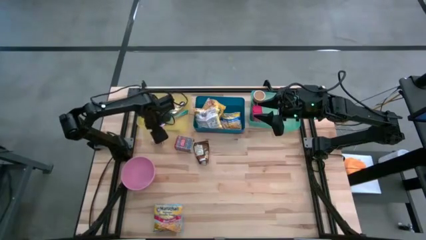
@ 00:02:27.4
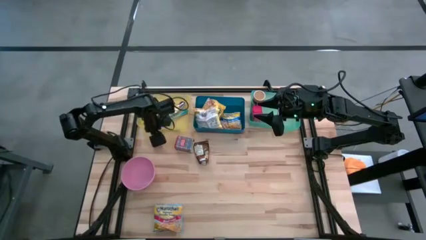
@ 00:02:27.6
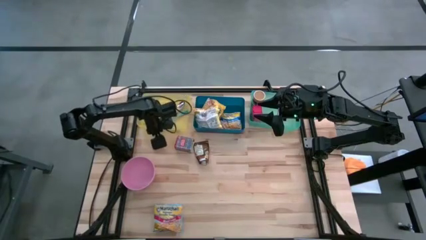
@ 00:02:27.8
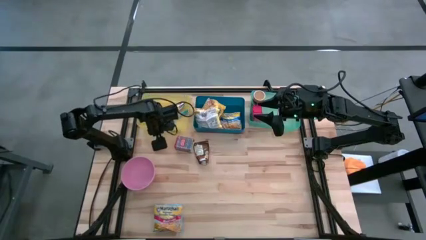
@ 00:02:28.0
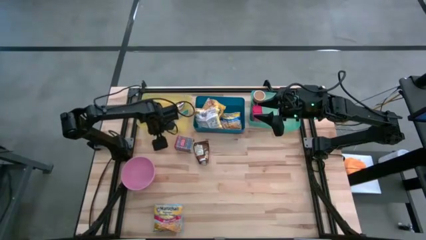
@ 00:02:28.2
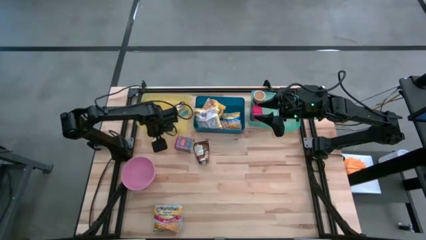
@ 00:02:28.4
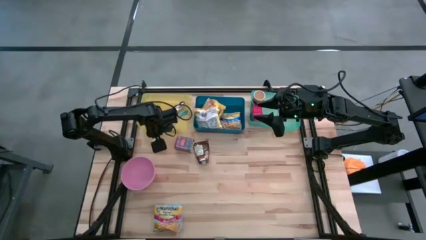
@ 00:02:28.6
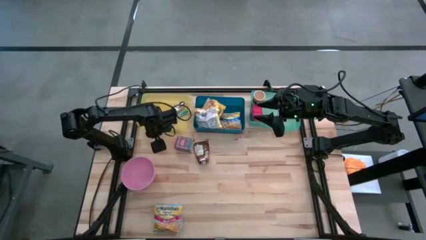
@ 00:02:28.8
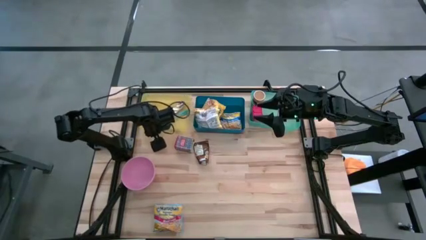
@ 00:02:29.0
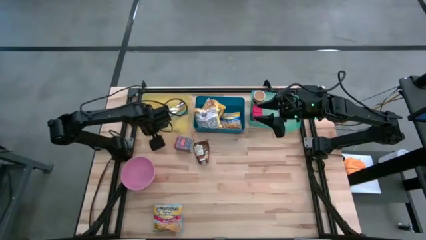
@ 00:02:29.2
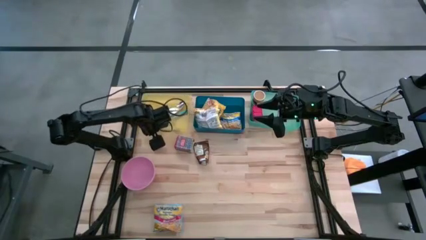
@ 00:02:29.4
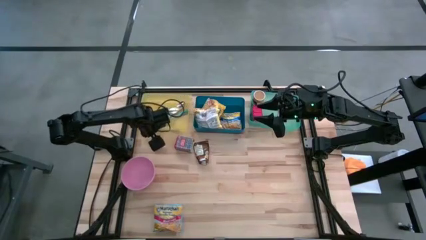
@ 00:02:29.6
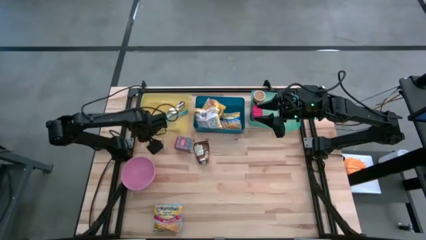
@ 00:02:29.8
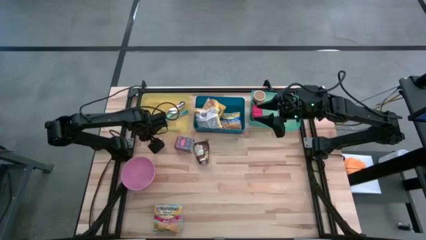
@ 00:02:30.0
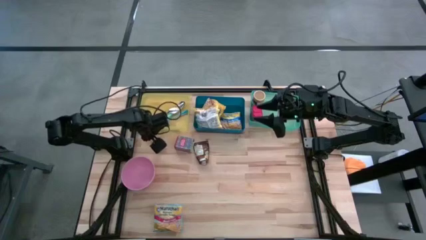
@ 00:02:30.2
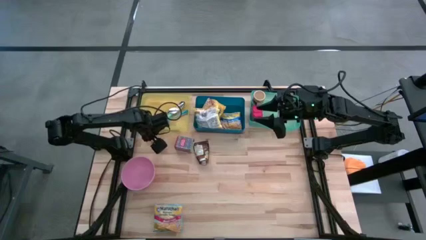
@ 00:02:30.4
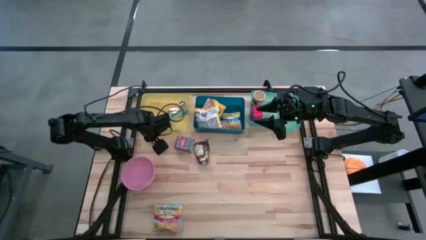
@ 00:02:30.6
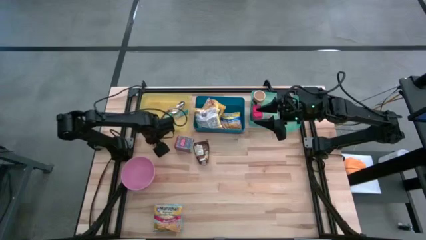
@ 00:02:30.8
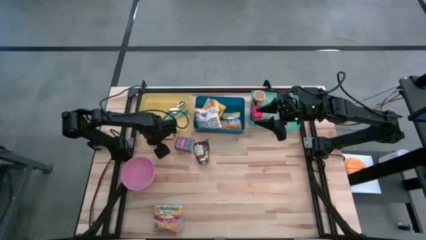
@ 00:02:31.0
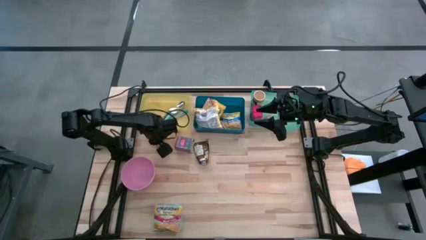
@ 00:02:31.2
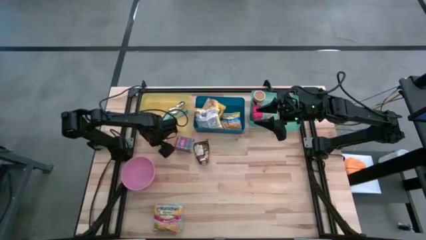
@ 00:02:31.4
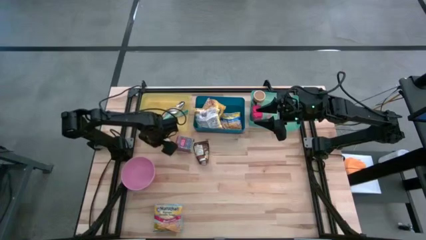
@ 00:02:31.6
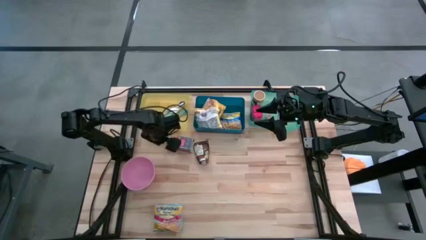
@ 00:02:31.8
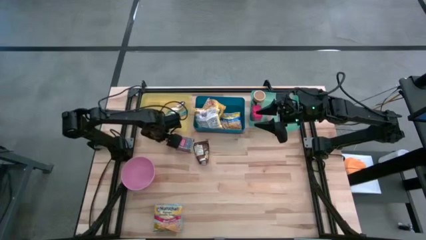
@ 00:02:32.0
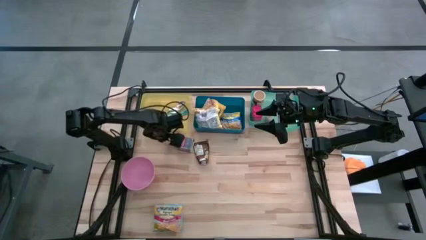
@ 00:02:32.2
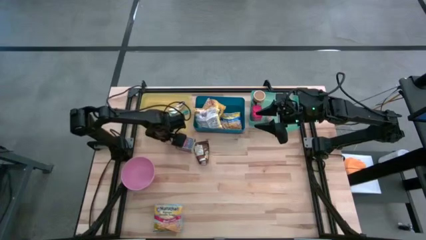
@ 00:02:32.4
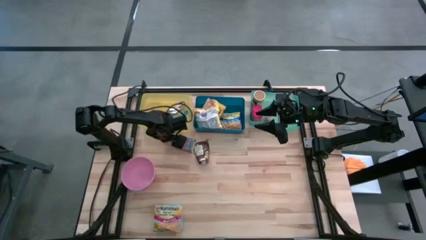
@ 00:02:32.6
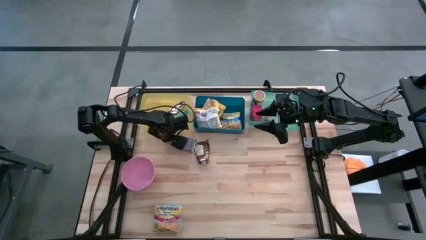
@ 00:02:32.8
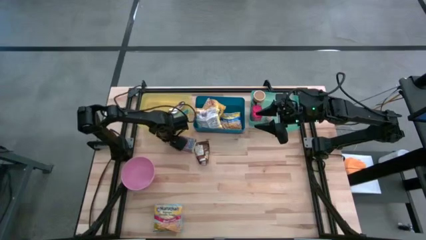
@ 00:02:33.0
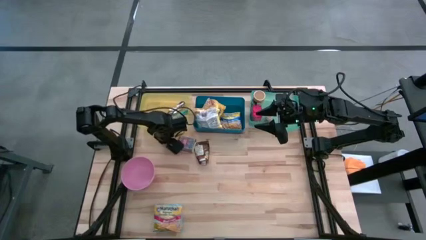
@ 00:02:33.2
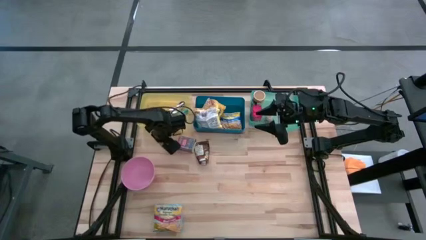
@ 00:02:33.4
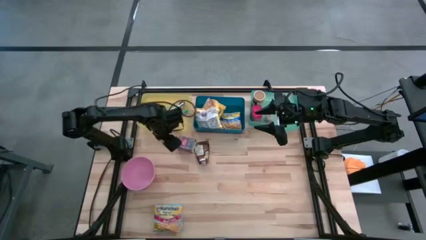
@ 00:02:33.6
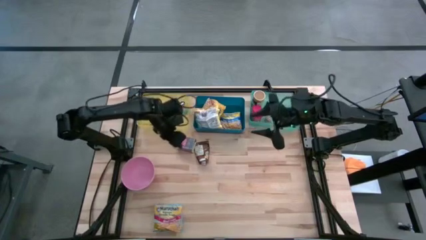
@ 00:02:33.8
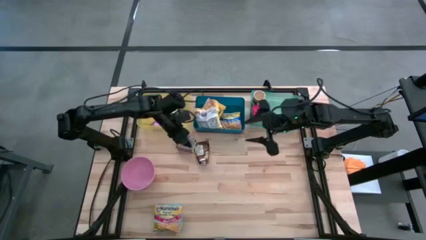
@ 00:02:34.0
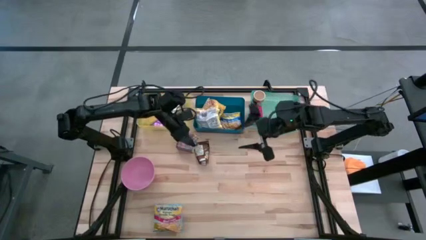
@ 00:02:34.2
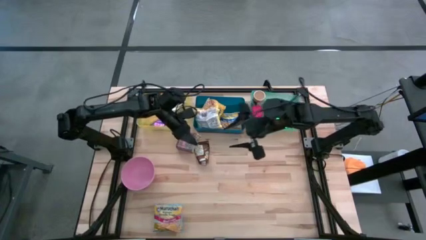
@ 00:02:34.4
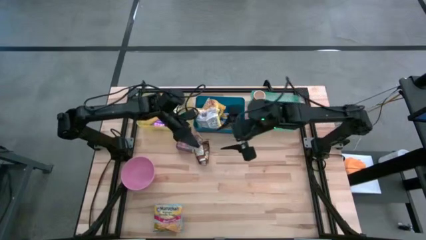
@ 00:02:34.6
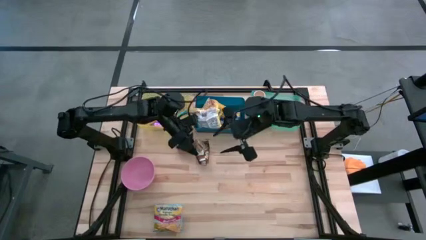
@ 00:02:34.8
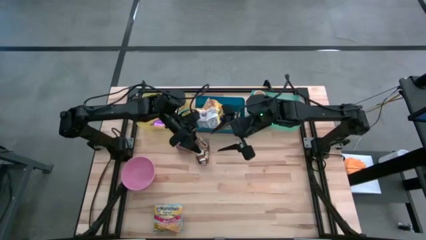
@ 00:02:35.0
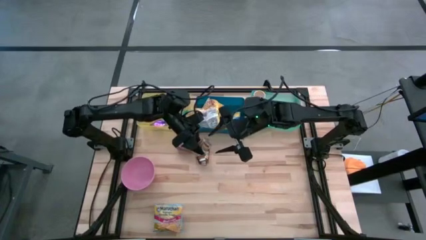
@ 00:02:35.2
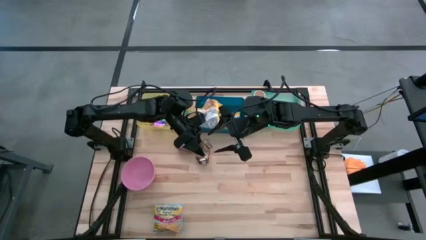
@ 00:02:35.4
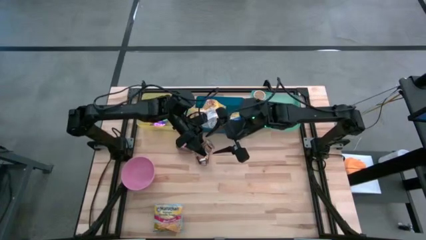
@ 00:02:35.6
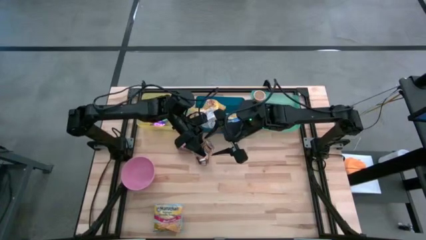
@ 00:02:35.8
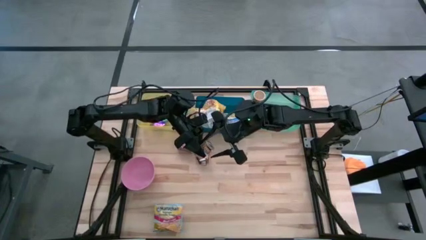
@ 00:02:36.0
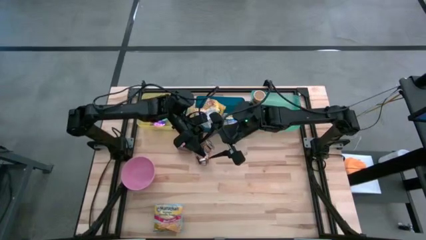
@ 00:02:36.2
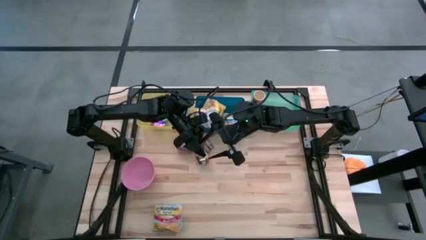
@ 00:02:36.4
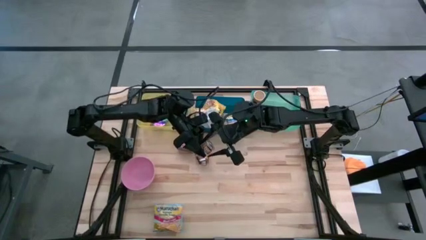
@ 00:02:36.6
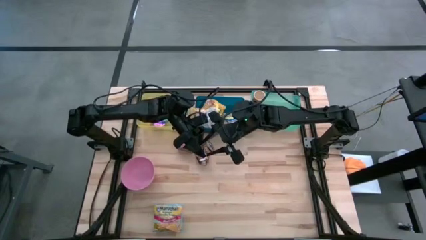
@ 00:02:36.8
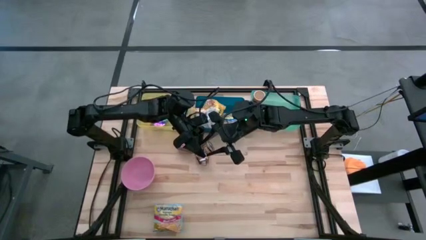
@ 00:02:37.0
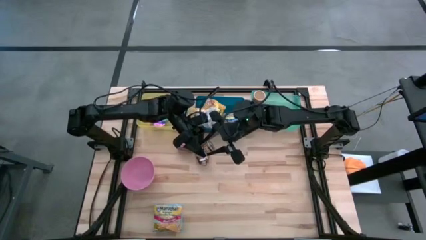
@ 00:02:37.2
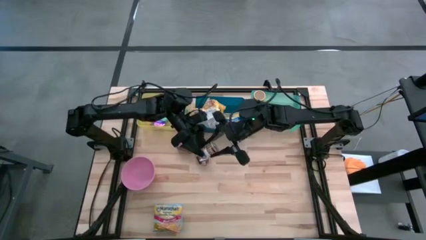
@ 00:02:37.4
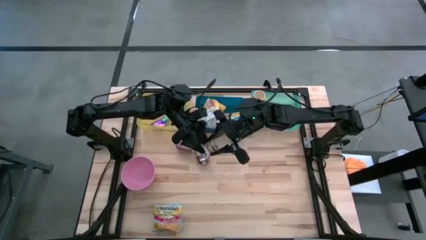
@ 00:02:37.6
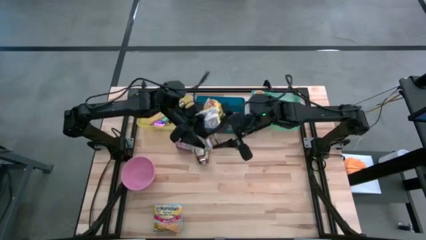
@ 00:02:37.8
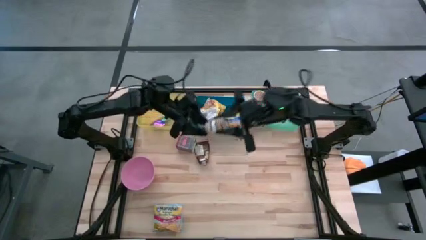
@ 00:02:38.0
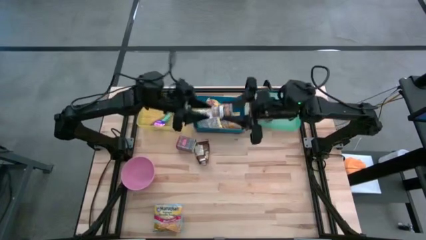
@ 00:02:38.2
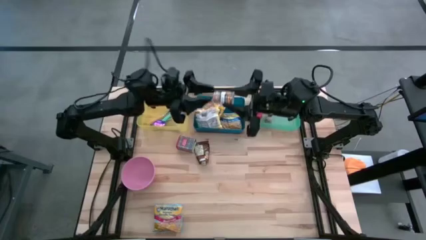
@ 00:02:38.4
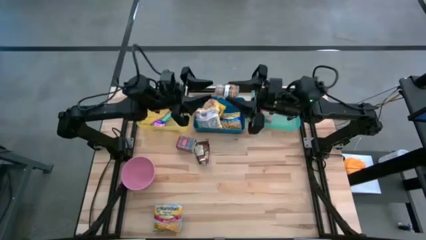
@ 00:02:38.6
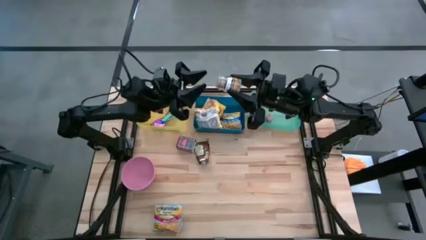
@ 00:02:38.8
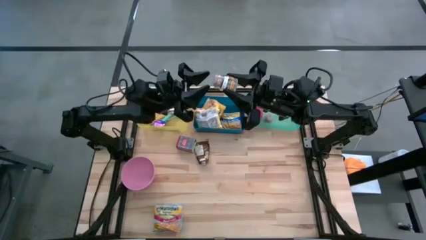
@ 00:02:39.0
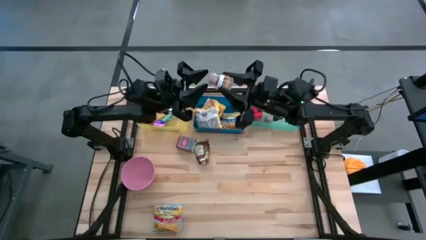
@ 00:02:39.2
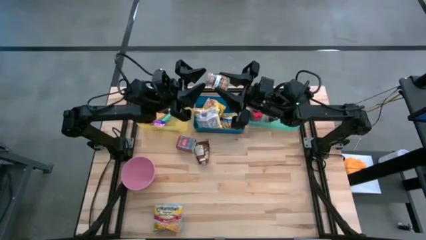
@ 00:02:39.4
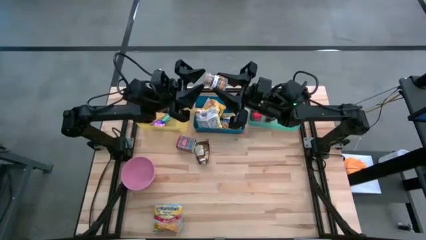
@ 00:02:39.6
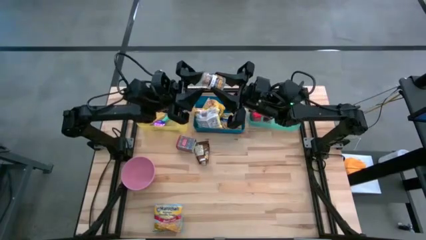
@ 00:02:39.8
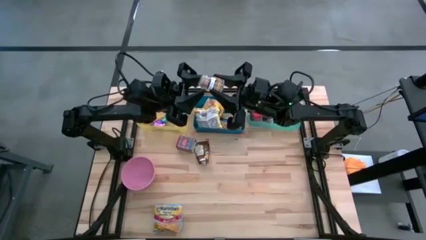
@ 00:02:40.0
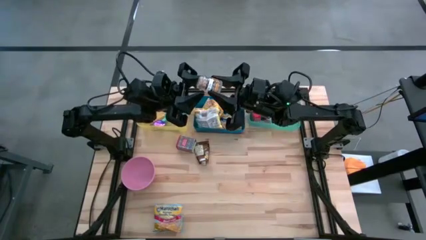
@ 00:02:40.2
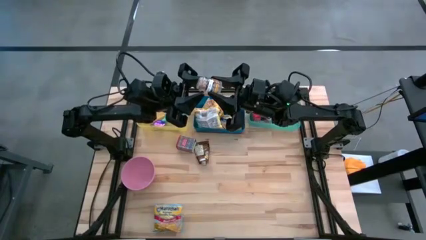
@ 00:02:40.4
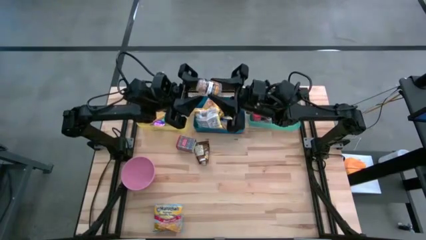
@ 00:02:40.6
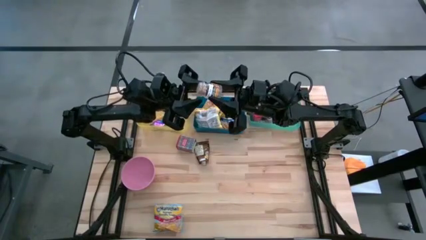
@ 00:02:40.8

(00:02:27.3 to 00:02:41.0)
Put the brown seasoning bottle into the light green bin

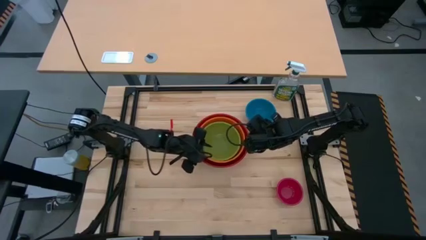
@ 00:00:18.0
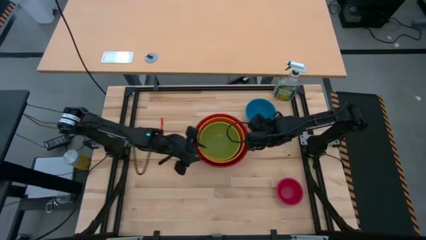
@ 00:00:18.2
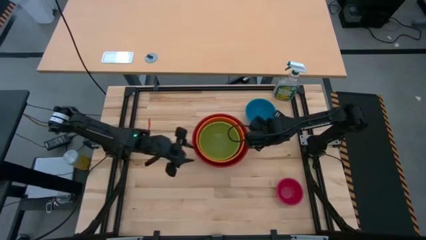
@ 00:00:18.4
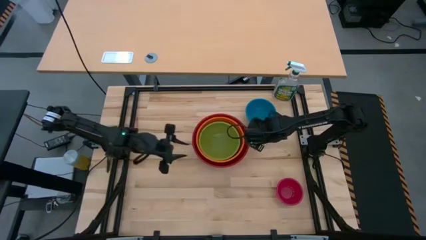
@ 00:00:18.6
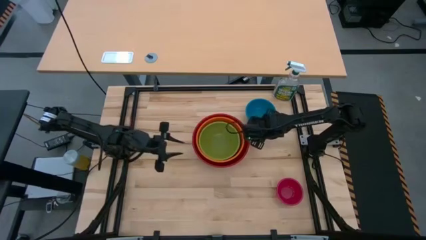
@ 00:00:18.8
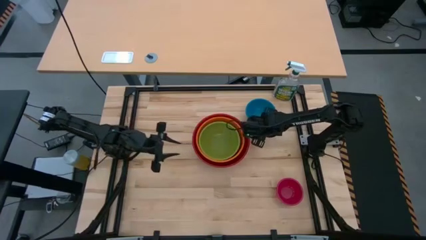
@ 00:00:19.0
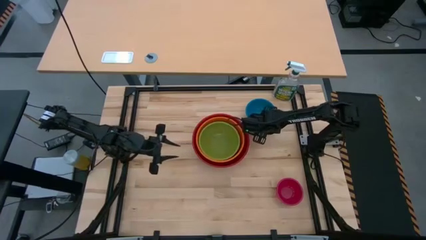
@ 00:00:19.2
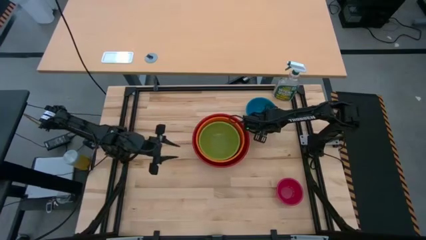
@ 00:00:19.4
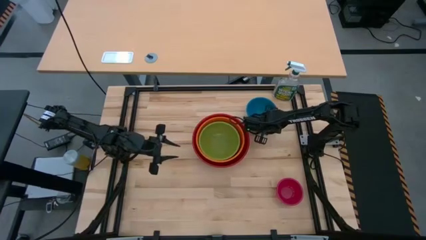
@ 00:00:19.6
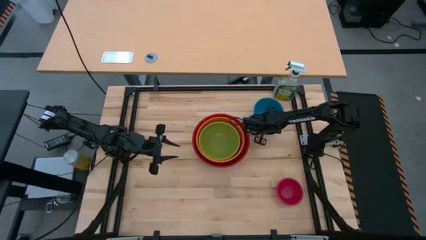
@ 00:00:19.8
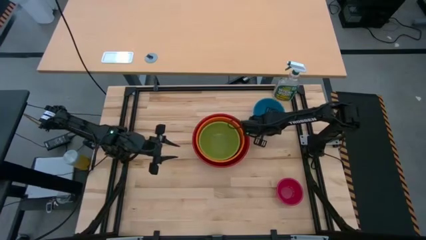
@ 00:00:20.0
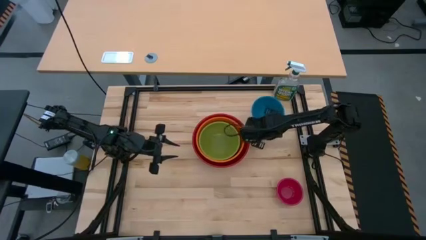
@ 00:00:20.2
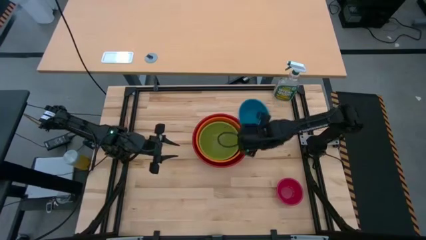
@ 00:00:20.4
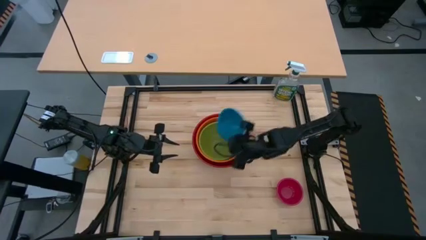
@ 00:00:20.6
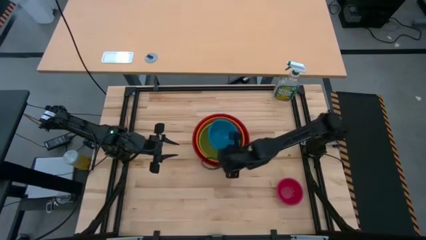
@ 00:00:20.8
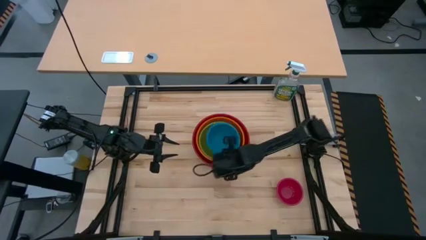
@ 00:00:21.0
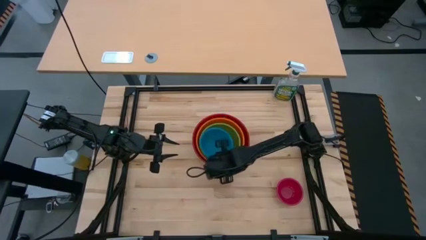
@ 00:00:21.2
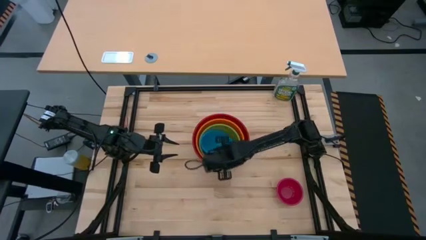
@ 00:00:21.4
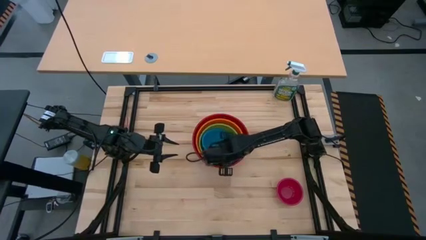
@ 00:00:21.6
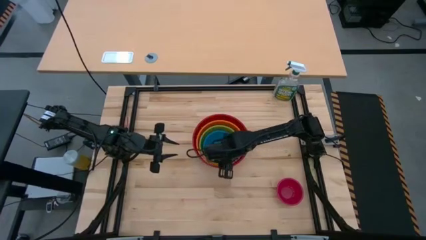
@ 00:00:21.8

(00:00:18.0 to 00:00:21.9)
Stack the blue bowl on top of the green bowl
